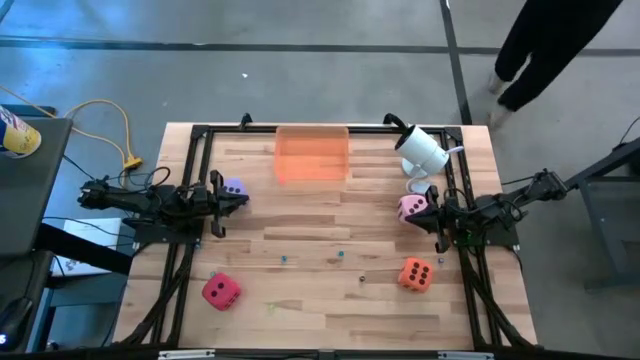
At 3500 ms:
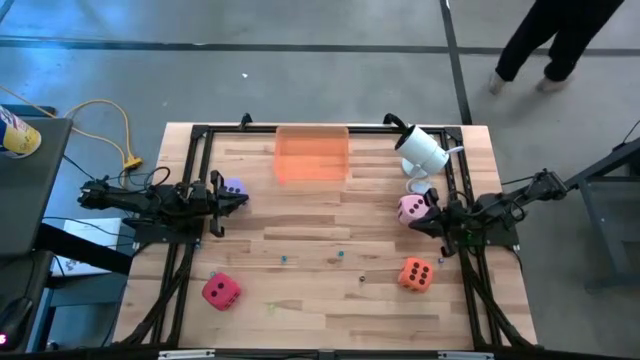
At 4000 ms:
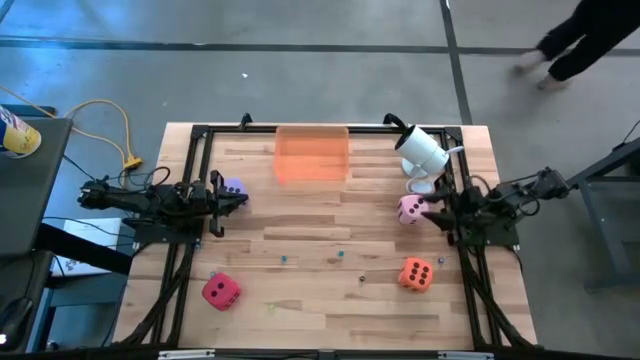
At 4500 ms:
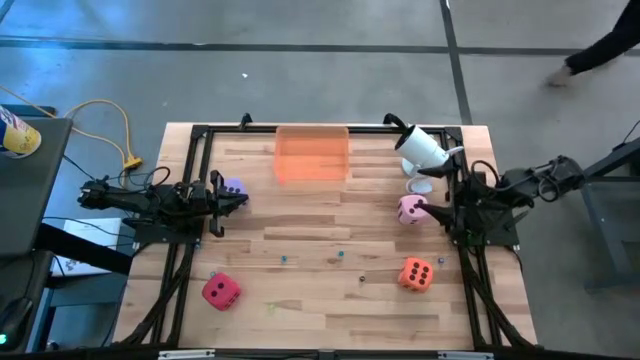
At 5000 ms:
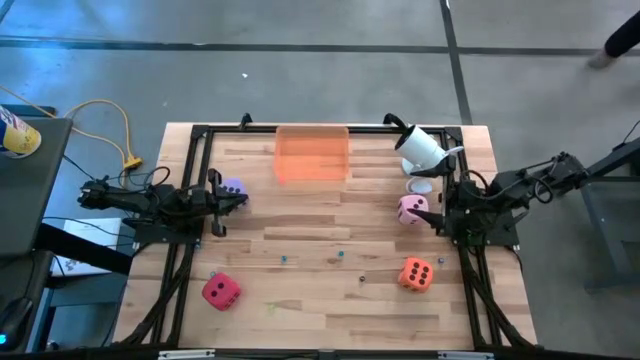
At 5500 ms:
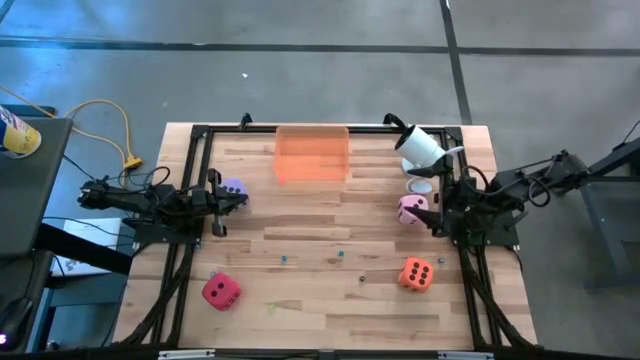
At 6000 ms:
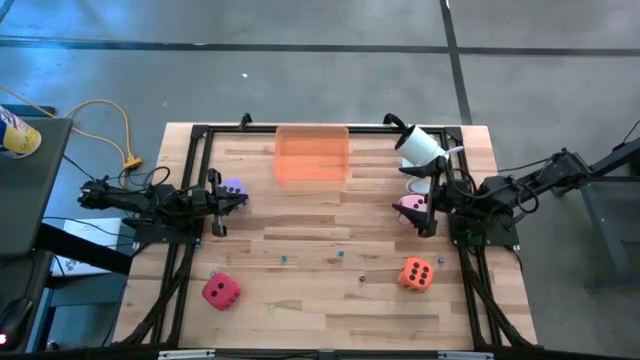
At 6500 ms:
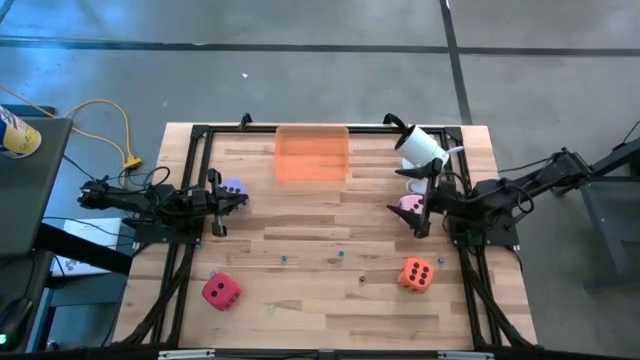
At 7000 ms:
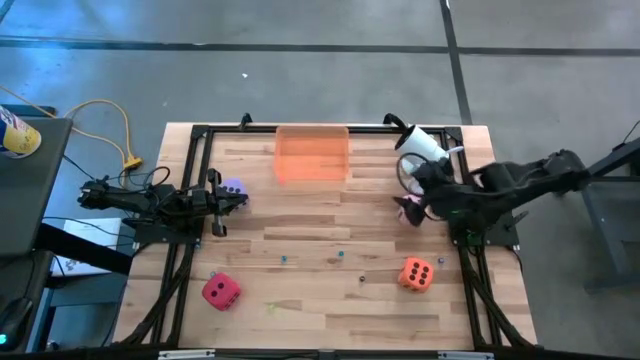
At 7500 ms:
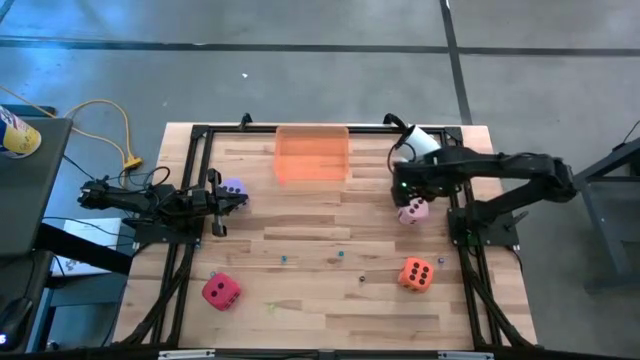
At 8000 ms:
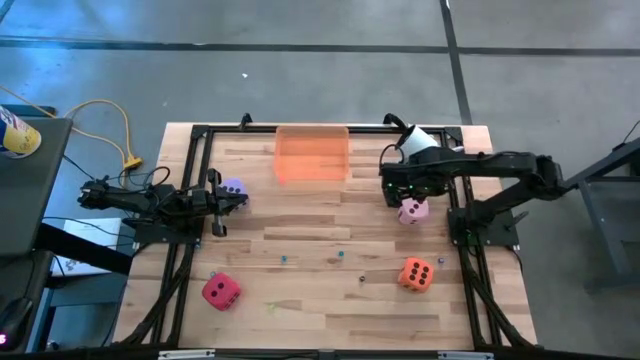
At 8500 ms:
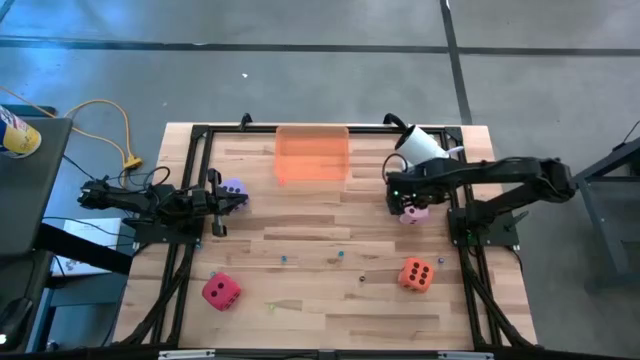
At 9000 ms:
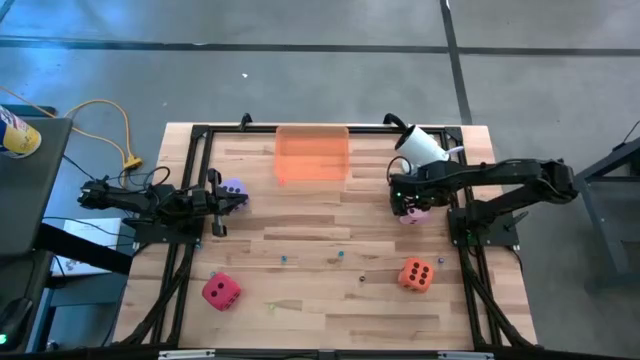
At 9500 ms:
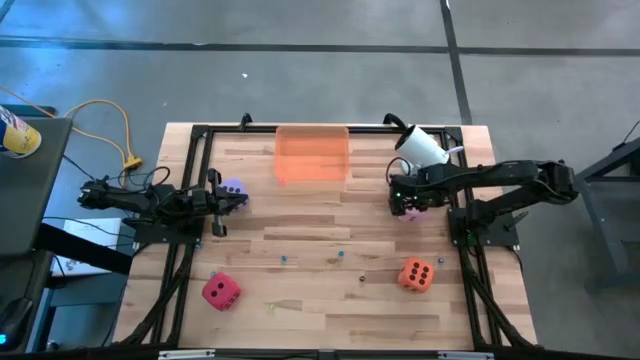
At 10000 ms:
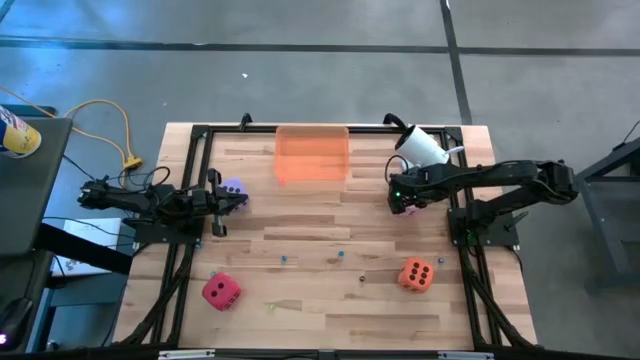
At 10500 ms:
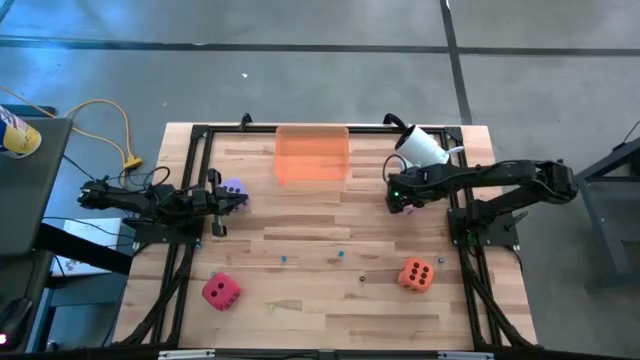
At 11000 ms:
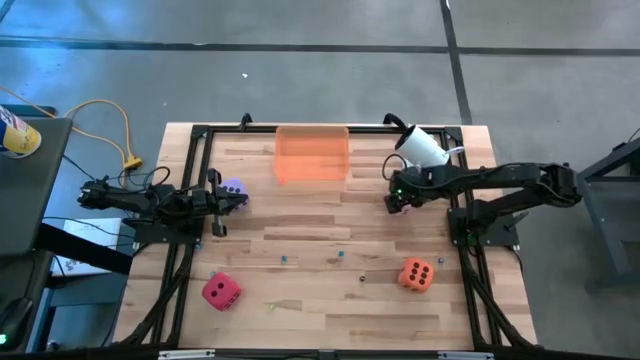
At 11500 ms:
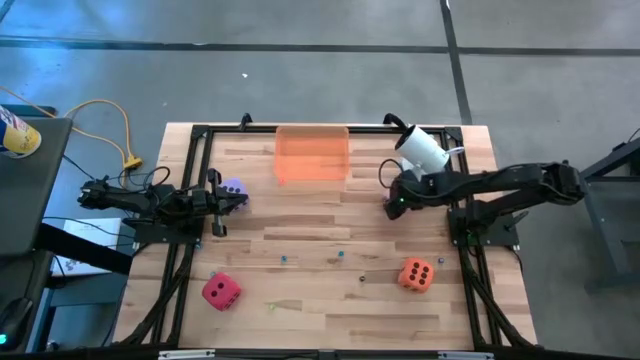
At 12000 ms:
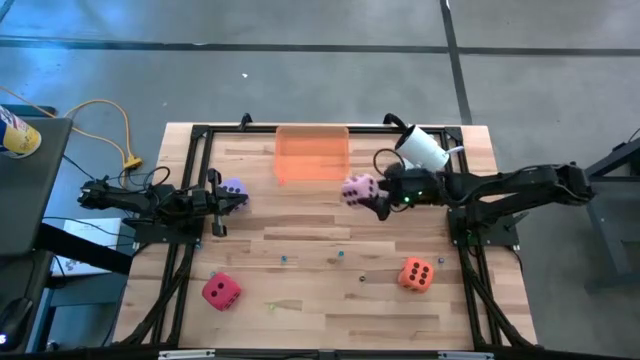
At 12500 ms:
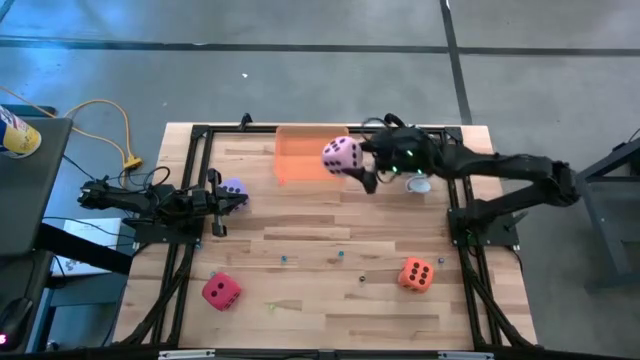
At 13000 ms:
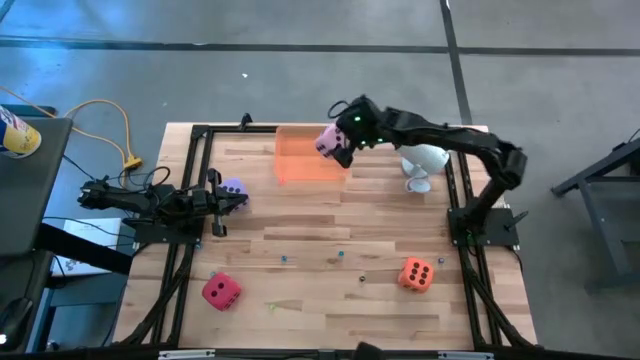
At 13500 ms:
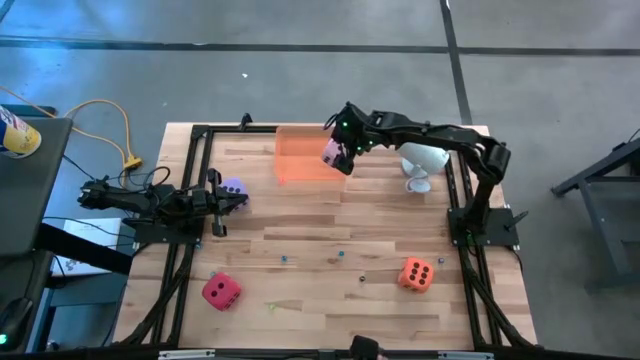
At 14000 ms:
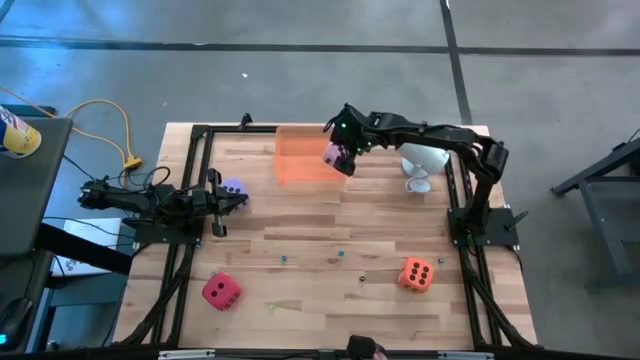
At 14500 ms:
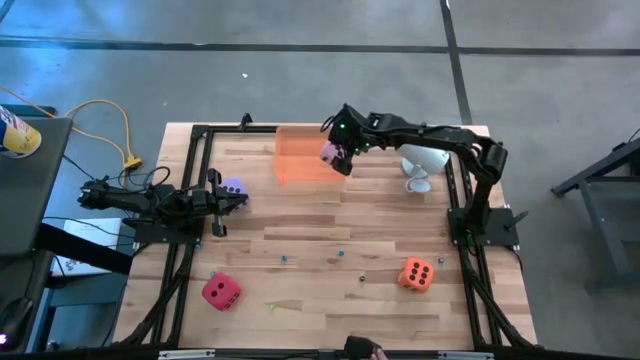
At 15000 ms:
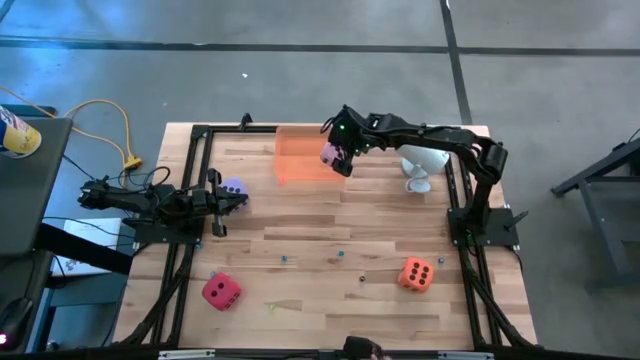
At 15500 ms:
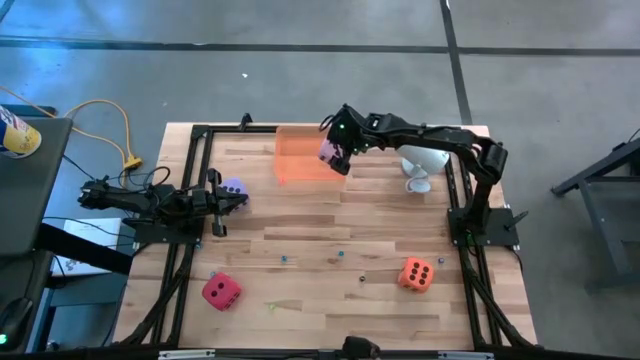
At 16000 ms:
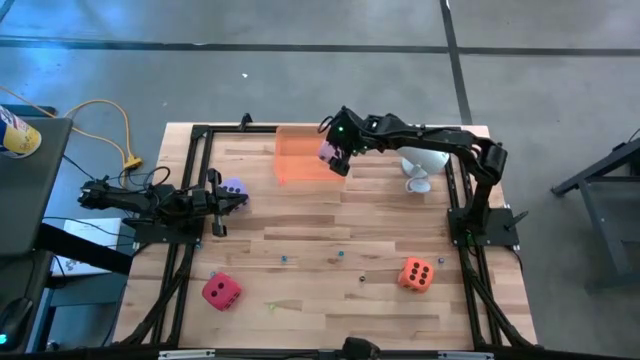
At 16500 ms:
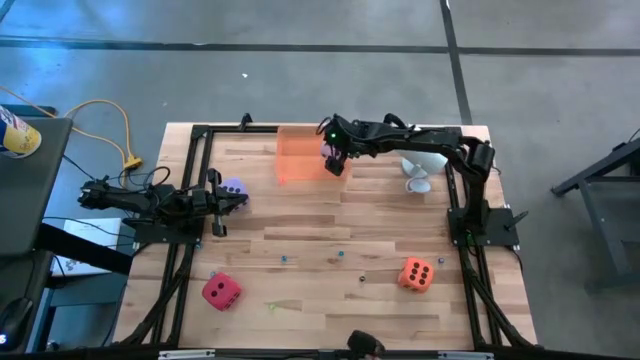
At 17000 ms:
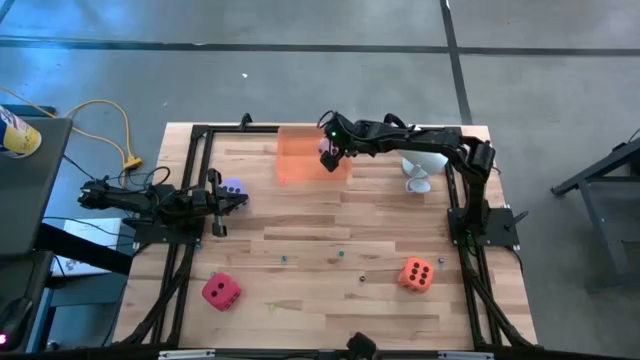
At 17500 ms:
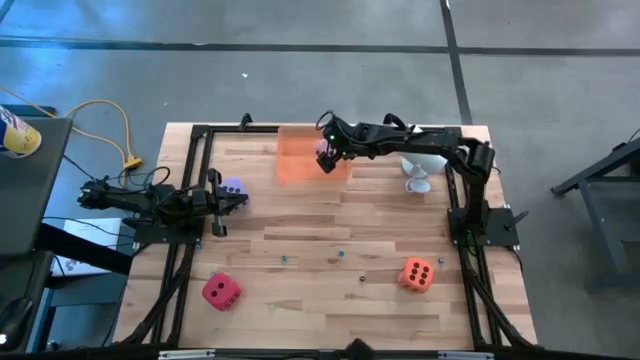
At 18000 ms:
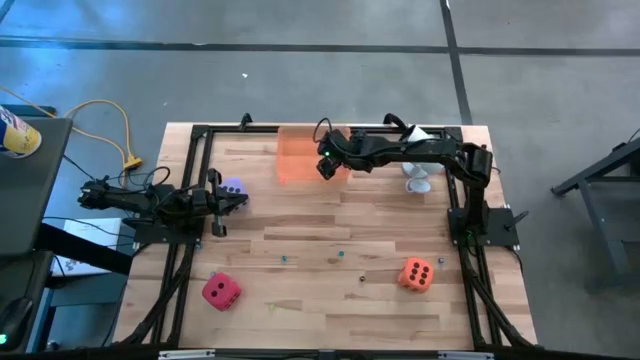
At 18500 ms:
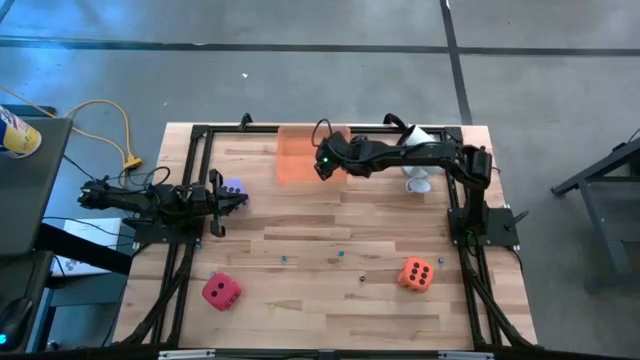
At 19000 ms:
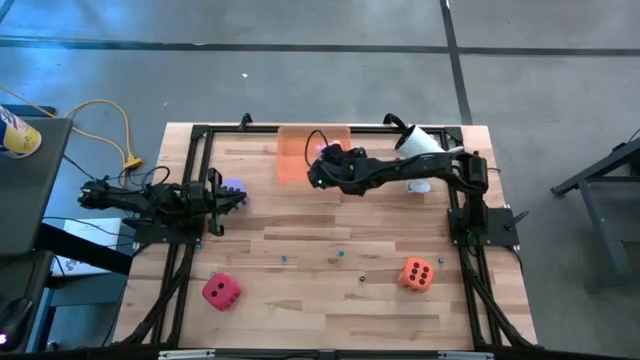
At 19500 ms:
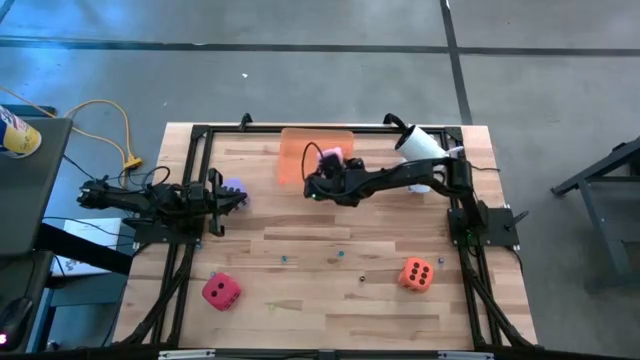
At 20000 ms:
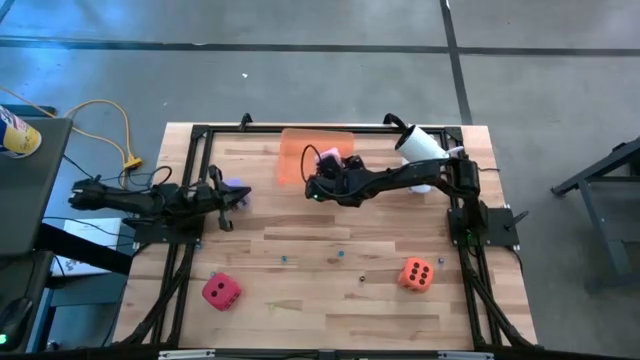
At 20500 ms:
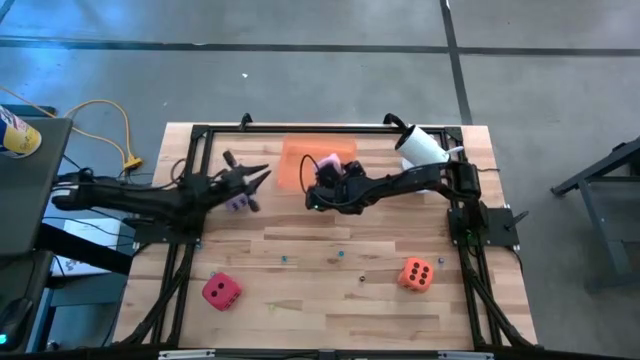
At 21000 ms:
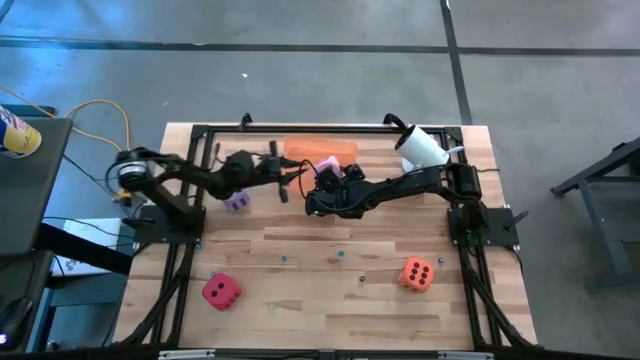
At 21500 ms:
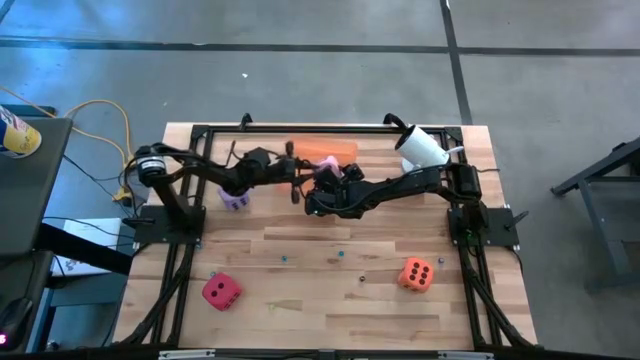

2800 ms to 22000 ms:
Task: Pick & Place Dice
Put the large pink die into the orange bin

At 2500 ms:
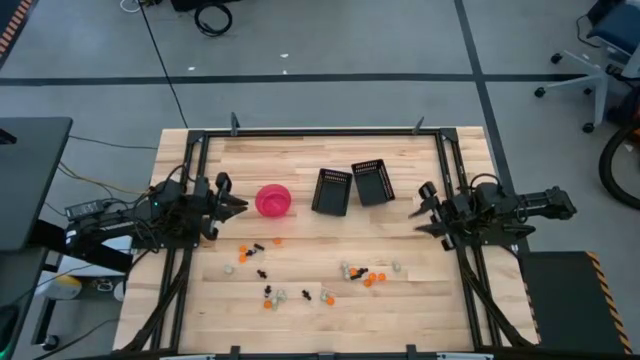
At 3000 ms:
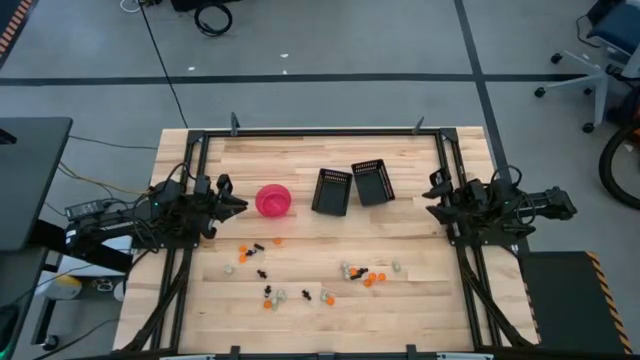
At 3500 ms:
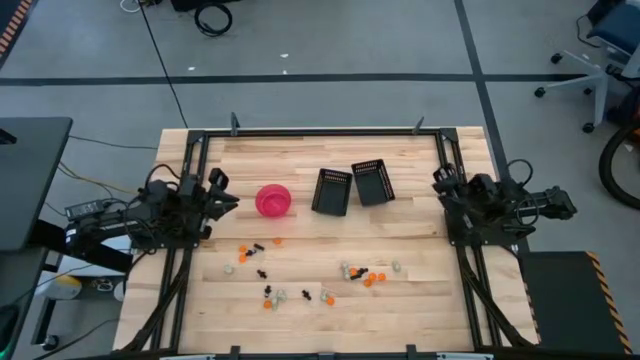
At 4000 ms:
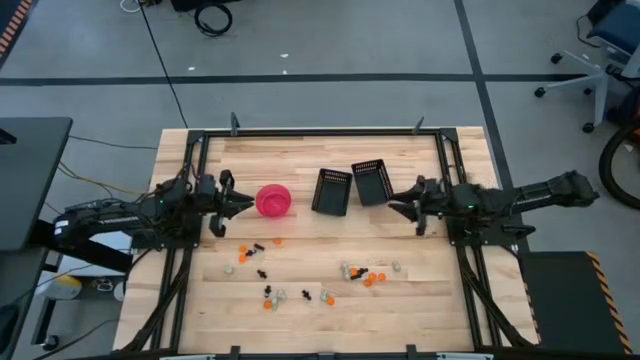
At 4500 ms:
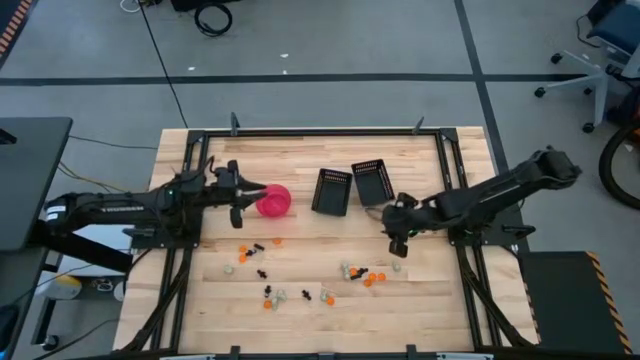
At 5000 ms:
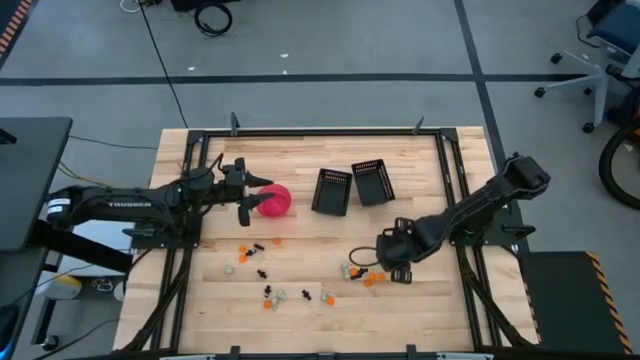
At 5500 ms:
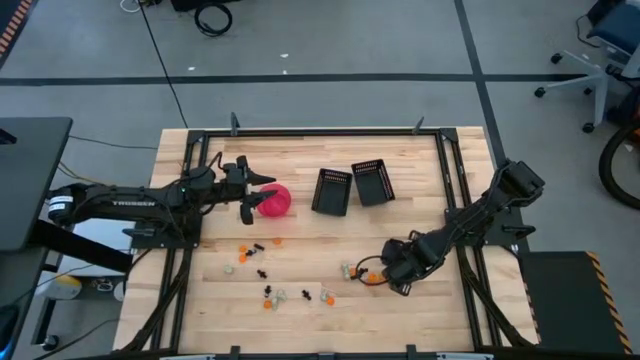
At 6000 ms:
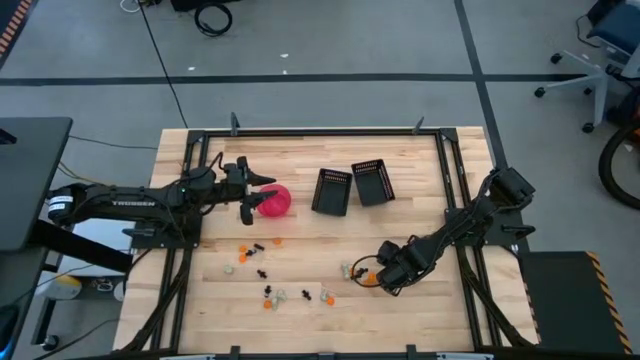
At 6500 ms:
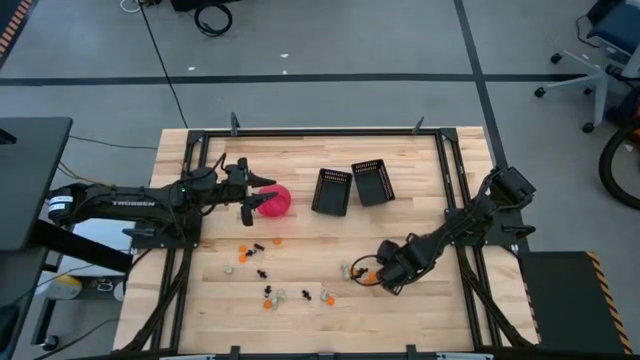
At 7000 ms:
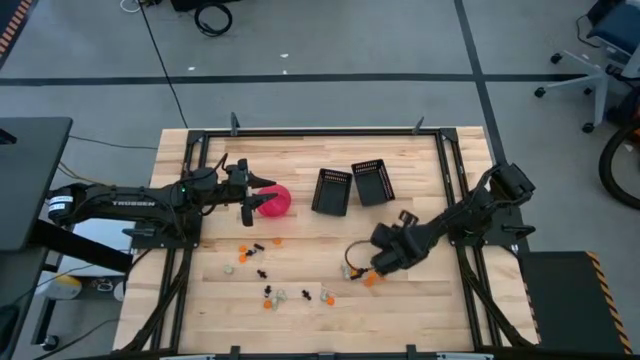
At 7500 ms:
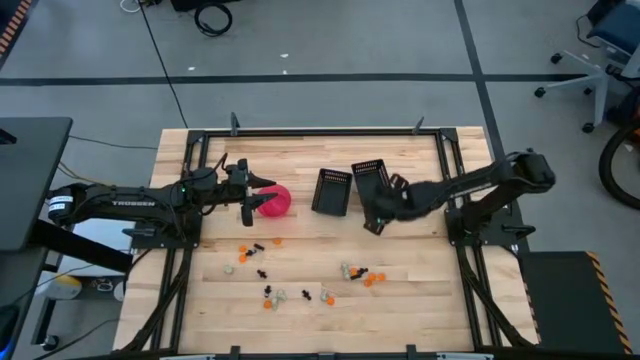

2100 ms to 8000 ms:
Task: Sort Halloween decoration
Put the white skull toy into the right black bin
